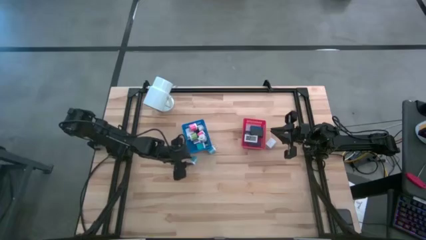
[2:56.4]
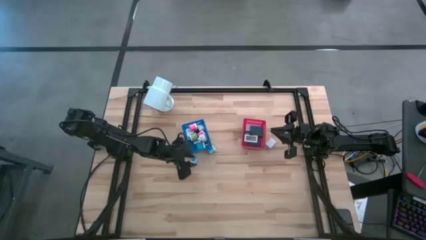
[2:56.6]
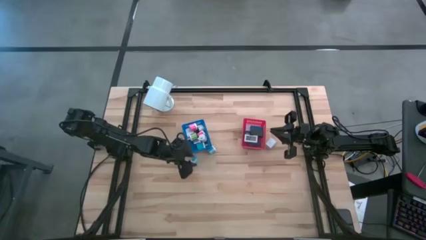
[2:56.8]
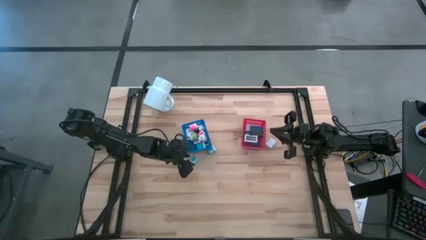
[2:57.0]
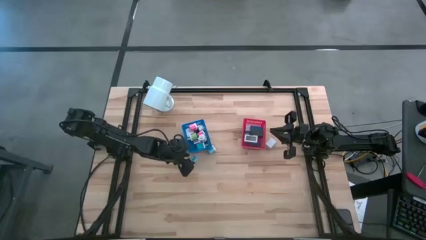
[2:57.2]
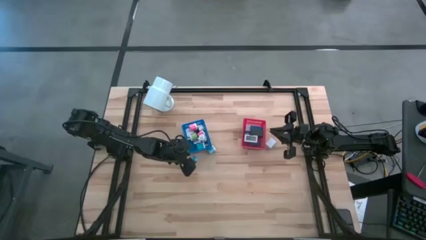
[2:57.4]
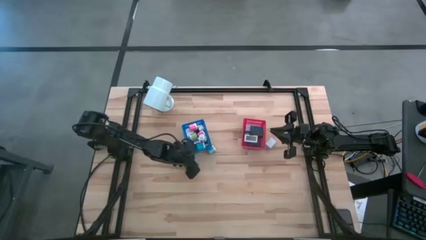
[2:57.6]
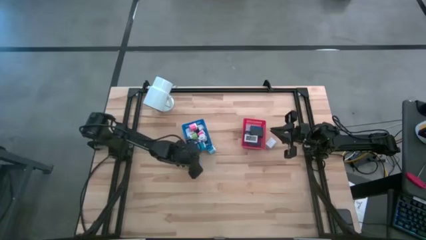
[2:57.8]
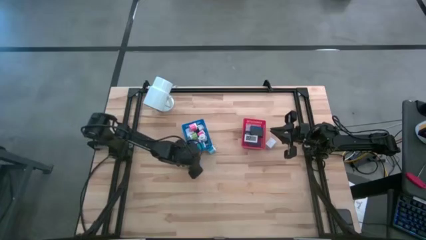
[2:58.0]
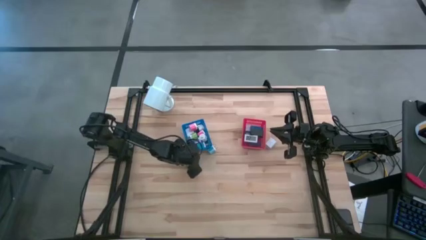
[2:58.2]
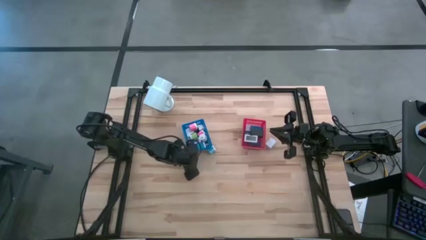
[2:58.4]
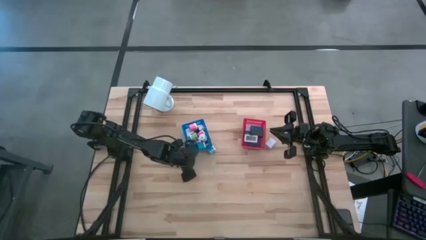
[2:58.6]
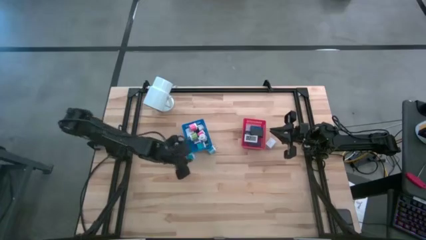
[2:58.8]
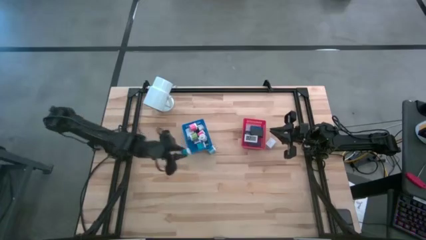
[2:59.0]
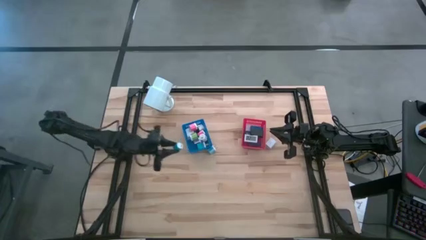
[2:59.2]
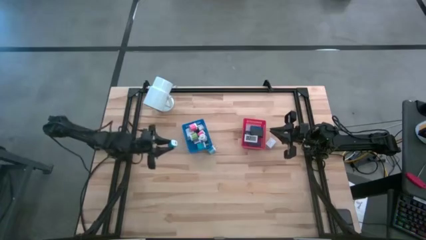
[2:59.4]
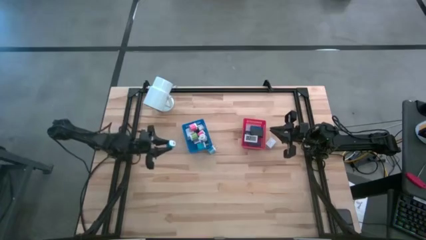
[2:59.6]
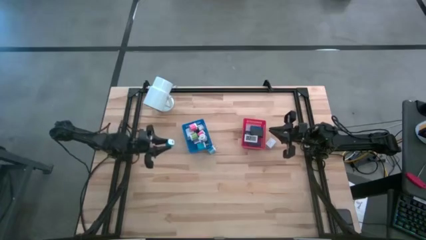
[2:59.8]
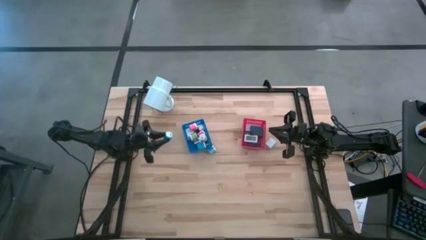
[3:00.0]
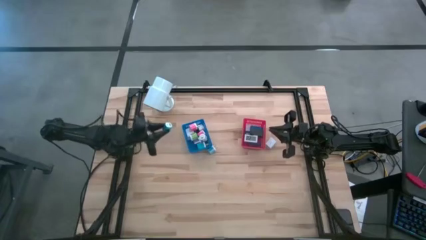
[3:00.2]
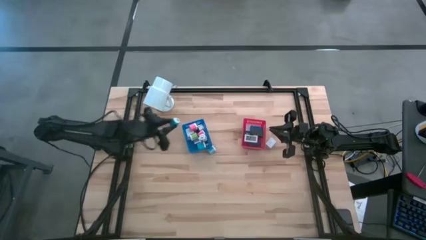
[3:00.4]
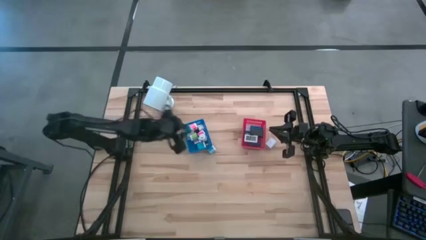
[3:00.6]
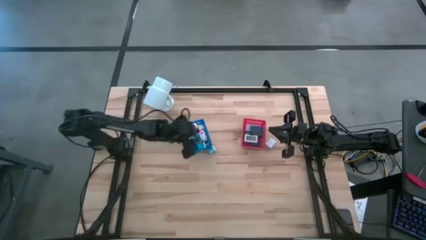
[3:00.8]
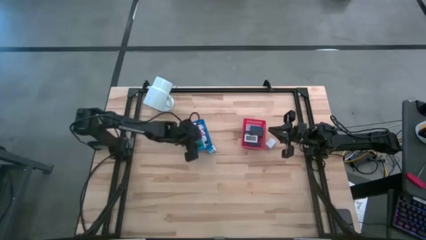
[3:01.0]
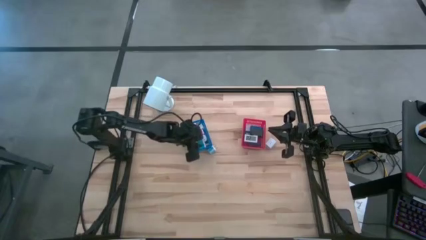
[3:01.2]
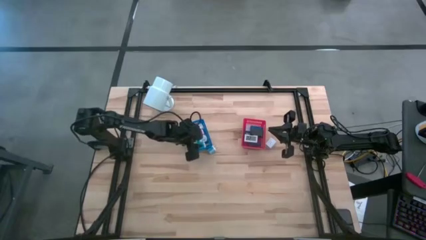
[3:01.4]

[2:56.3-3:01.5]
Task: Pick & Place Office items
Put the bottom blue charger adapter into the blue bin

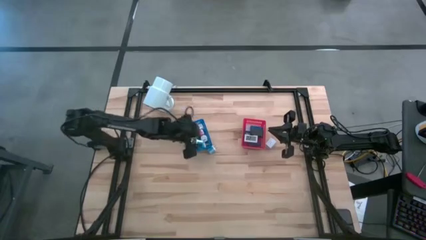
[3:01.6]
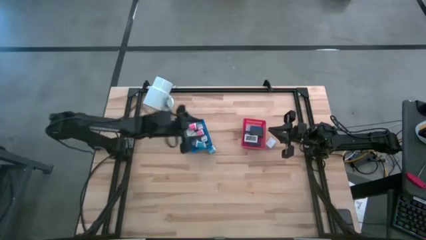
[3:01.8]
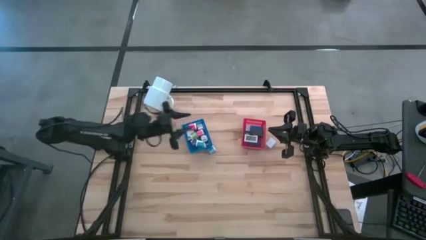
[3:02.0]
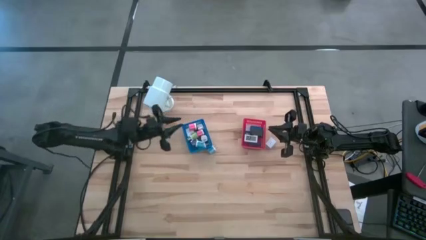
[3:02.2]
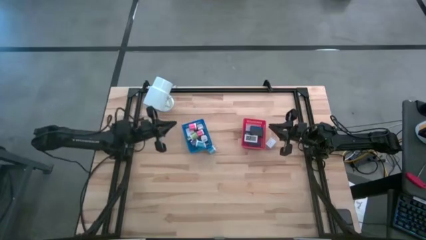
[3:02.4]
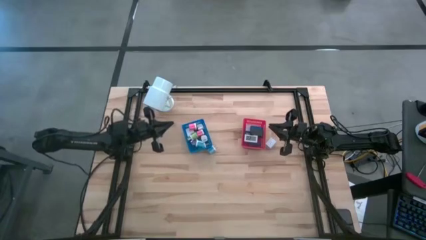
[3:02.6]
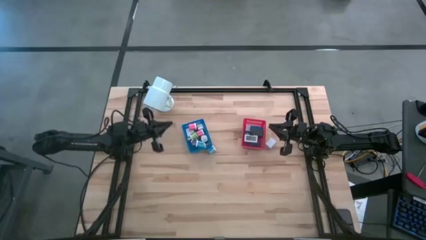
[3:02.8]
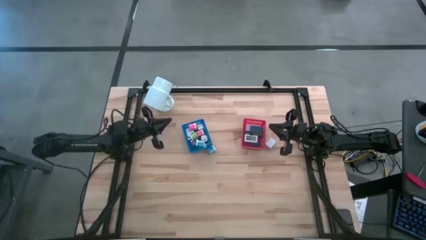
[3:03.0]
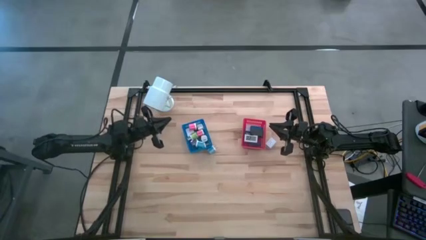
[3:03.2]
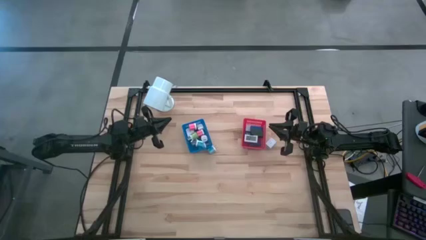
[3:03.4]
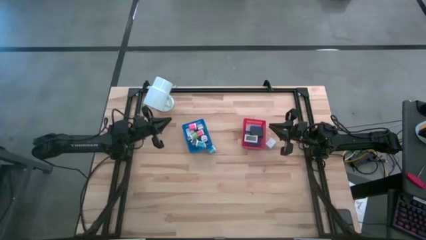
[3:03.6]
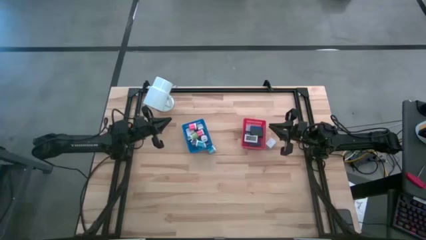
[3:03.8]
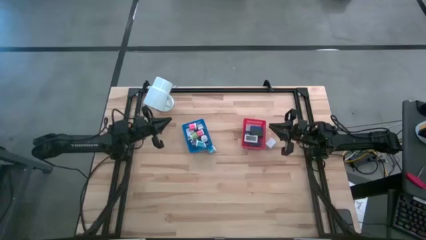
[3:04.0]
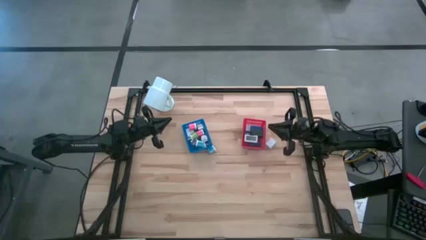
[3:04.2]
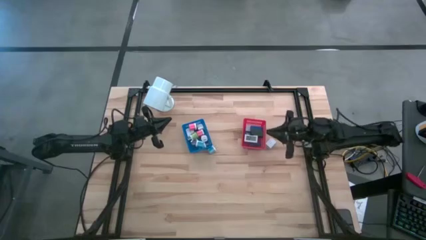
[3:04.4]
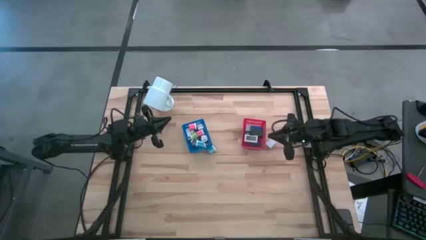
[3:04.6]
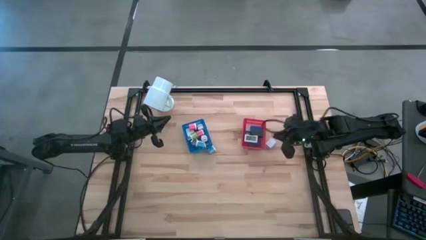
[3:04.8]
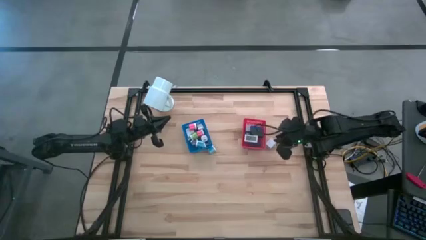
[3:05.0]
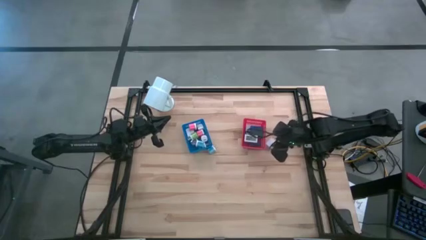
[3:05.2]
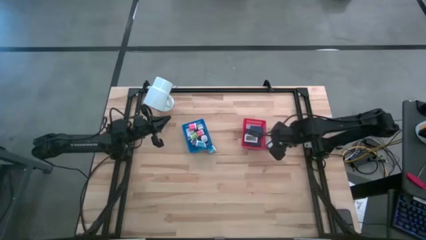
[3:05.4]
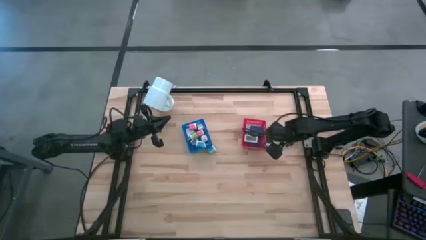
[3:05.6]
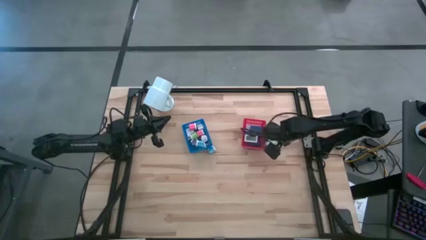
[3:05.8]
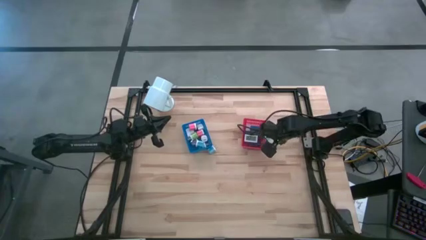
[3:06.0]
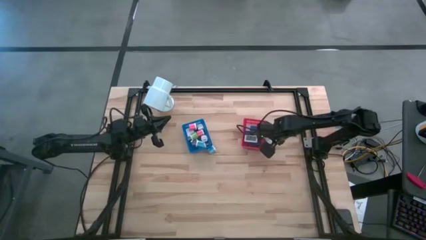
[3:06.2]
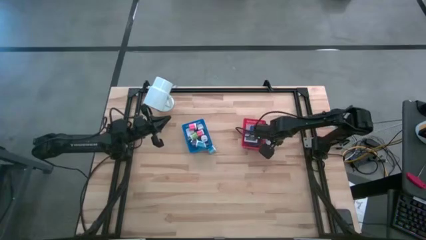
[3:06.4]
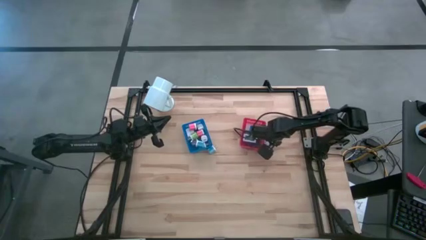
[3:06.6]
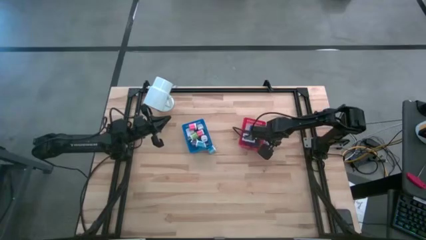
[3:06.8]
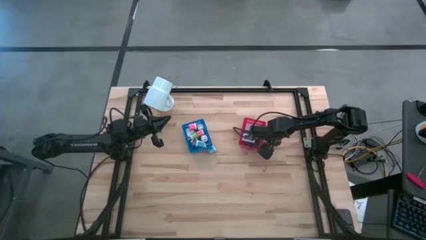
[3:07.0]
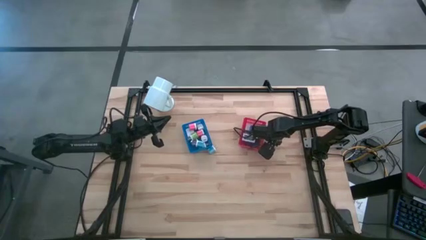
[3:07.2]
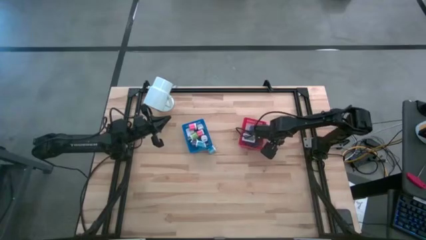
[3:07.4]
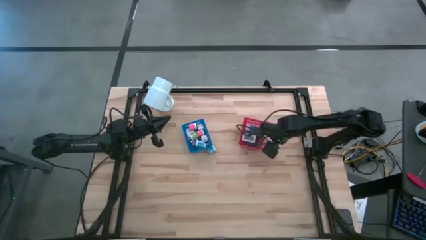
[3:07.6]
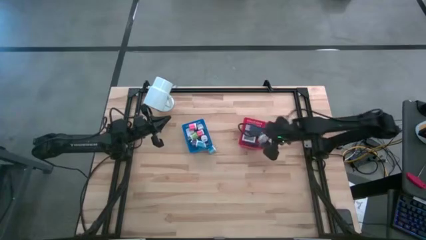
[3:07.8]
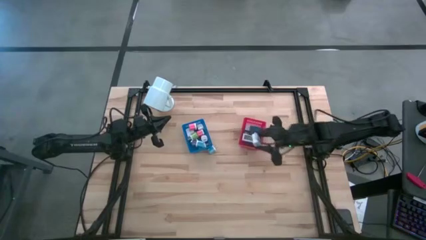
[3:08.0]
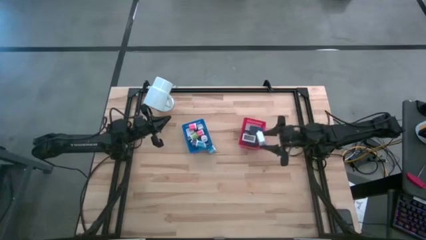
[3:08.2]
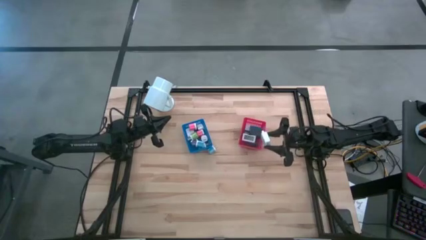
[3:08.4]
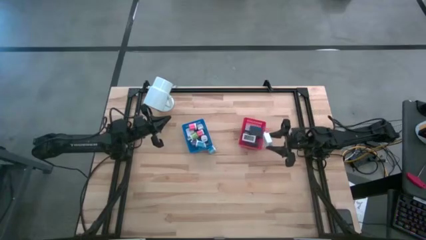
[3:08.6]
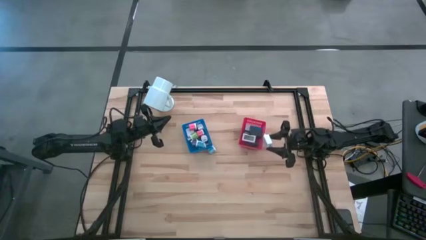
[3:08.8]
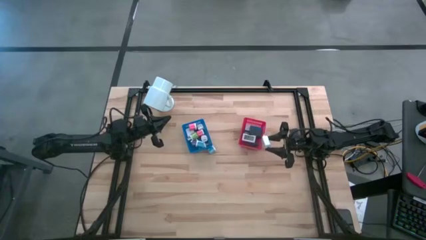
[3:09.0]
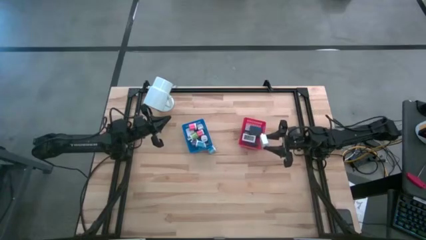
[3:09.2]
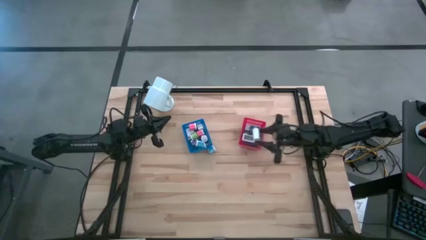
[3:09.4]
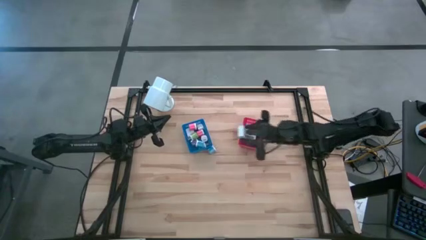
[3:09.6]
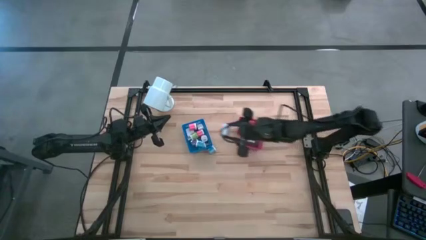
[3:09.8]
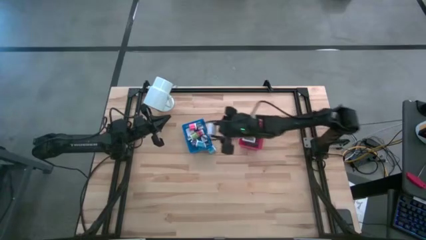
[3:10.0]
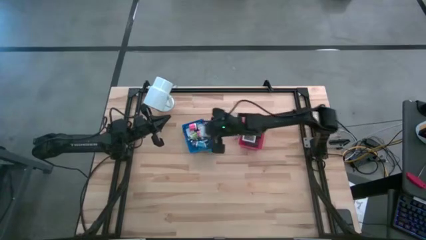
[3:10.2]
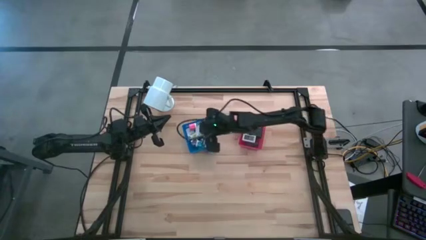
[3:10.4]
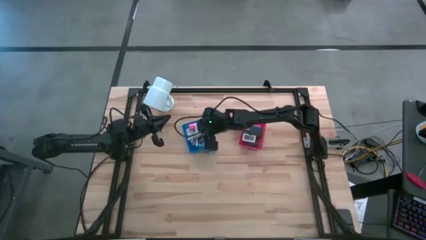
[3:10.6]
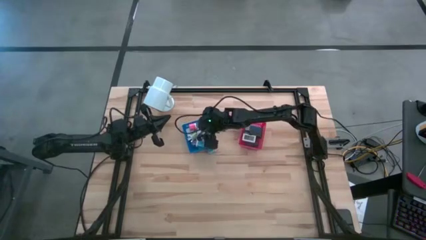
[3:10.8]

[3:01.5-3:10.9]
Put the white charger adapter into the blue bin

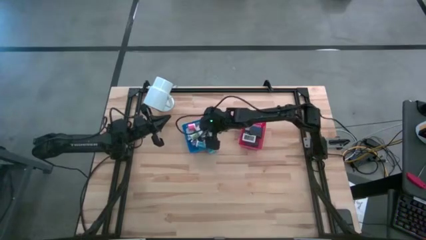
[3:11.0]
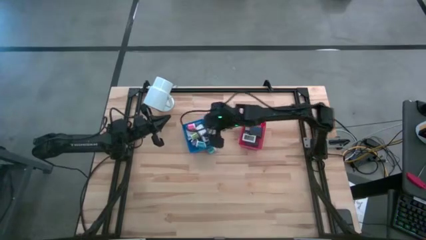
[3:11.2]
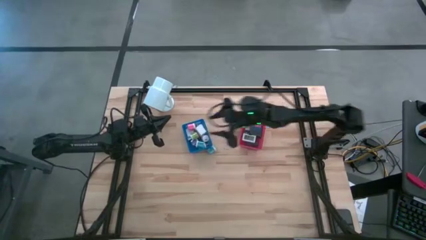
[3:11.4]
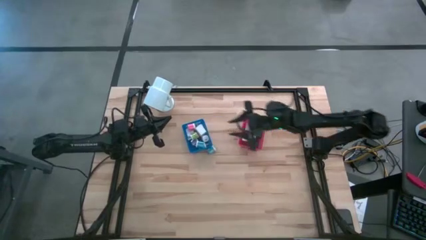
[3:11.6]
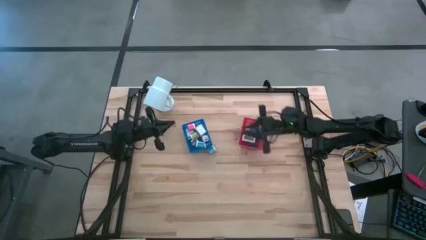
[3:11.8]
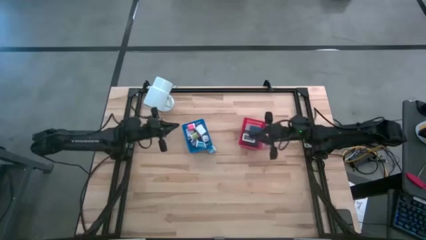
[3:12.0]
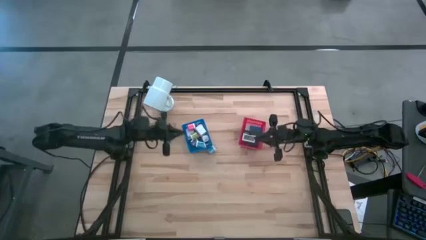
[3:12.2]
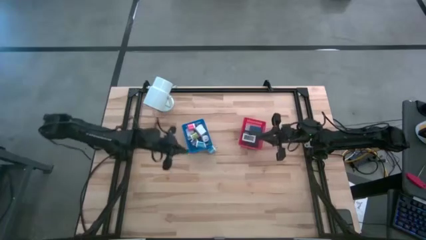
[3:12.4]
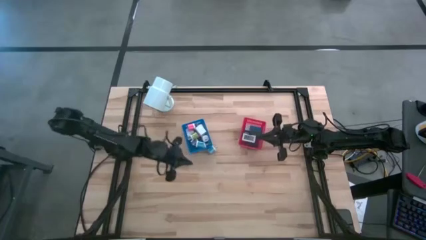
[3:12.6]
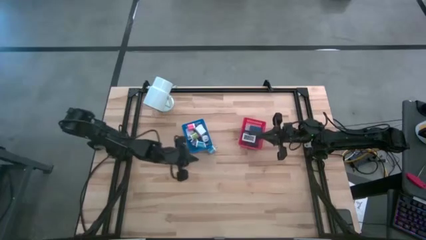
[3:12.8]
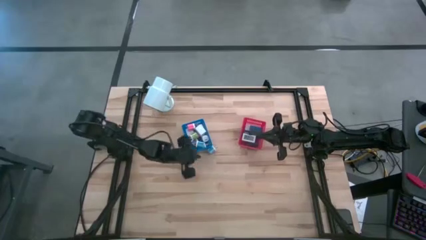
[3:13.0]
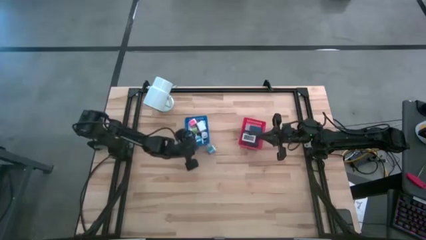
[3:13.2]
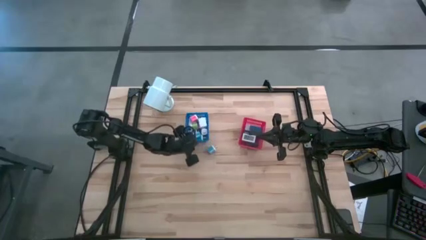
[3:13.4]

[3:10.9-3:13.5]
Adjust the blue bin
